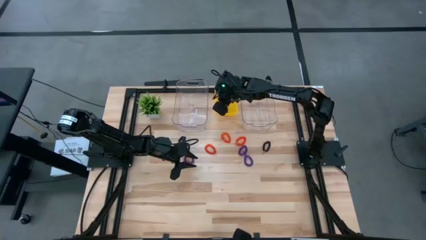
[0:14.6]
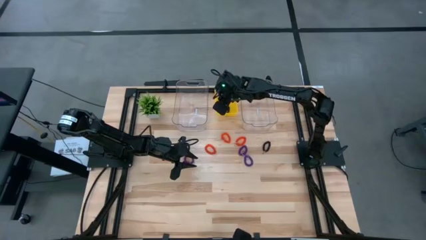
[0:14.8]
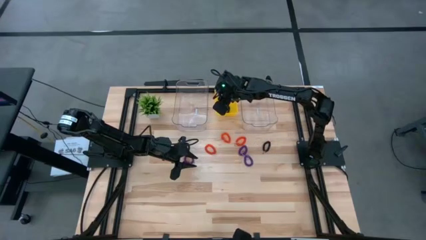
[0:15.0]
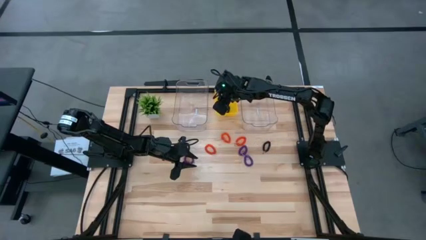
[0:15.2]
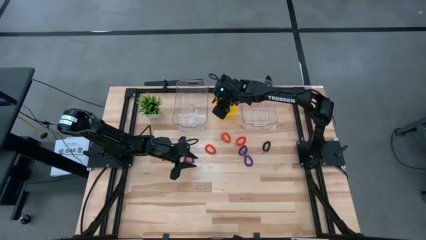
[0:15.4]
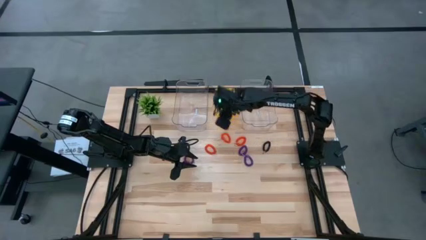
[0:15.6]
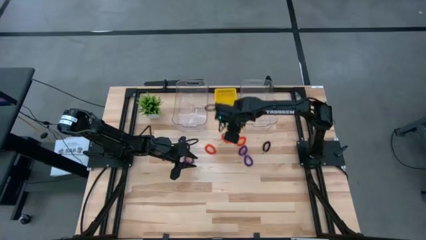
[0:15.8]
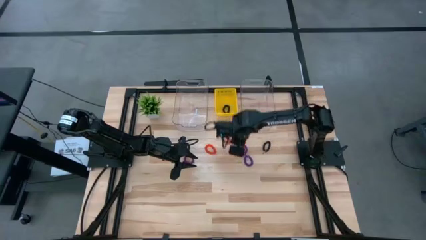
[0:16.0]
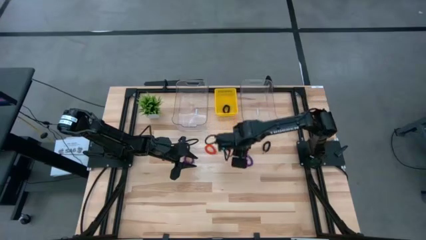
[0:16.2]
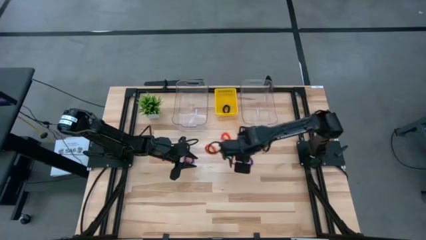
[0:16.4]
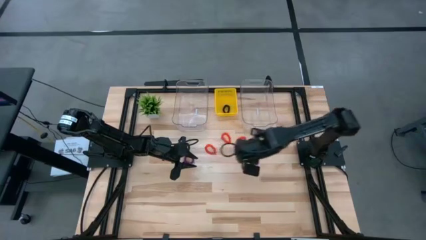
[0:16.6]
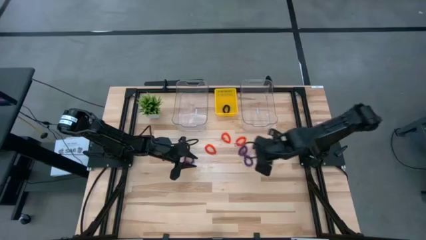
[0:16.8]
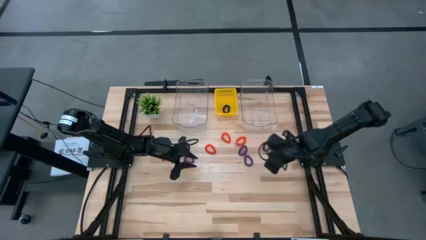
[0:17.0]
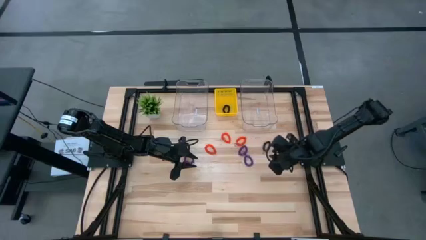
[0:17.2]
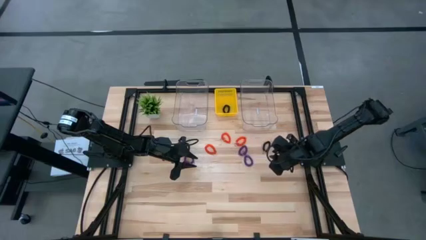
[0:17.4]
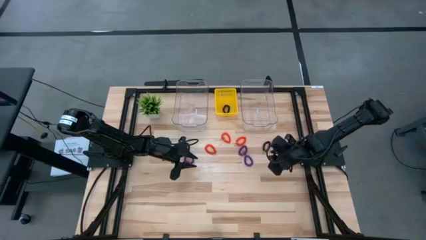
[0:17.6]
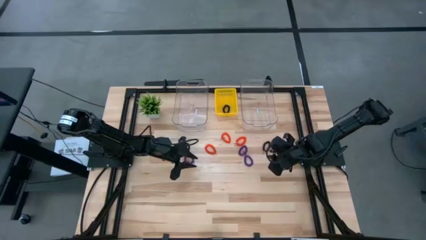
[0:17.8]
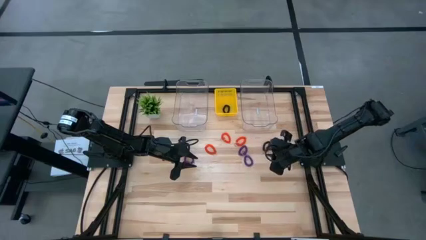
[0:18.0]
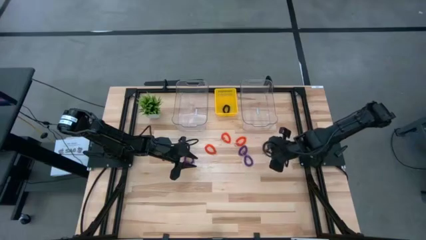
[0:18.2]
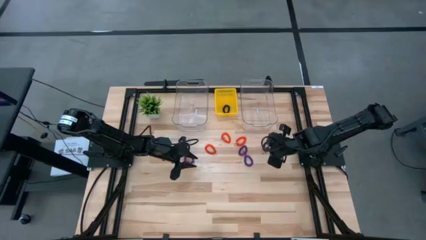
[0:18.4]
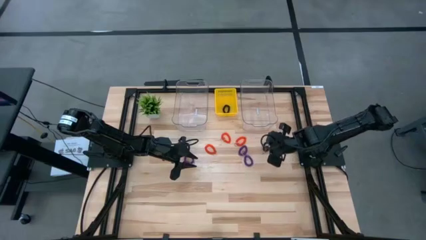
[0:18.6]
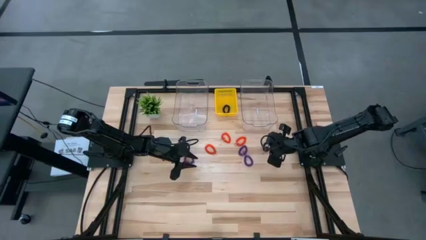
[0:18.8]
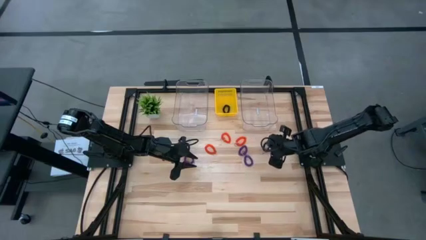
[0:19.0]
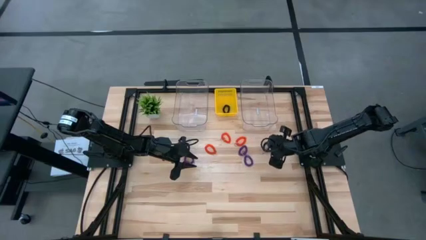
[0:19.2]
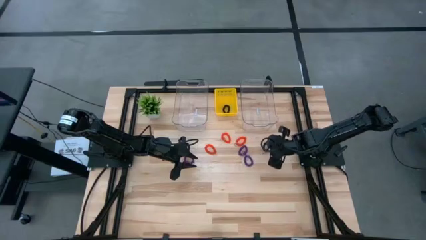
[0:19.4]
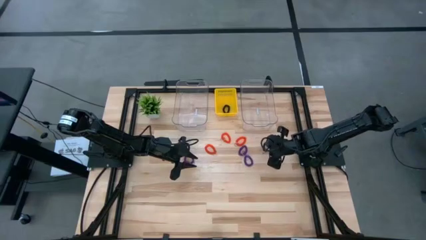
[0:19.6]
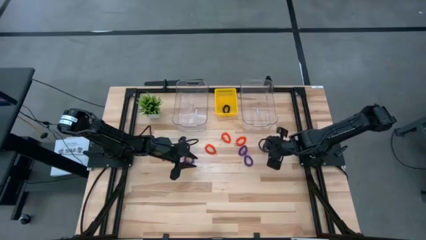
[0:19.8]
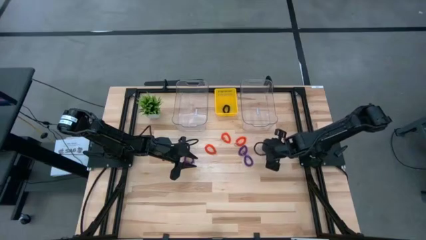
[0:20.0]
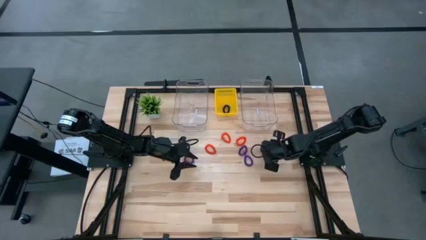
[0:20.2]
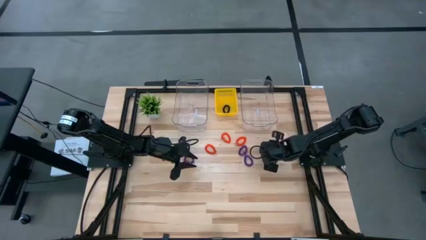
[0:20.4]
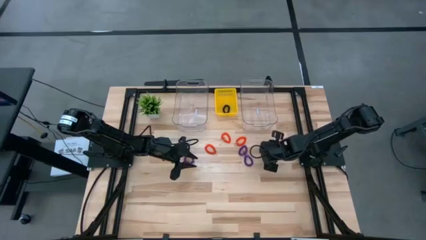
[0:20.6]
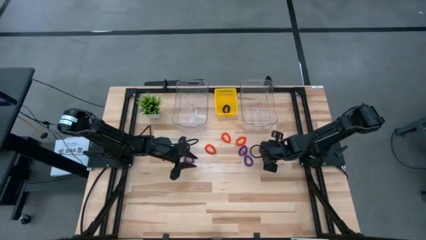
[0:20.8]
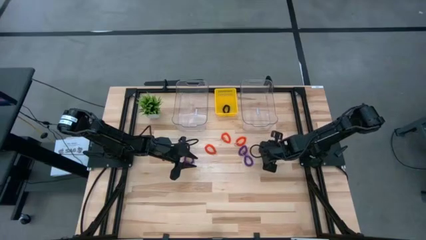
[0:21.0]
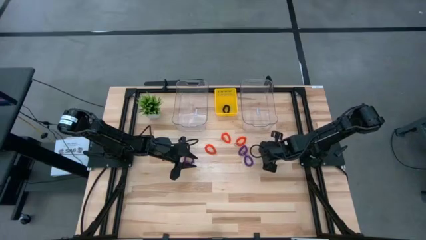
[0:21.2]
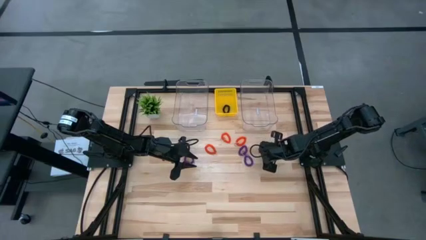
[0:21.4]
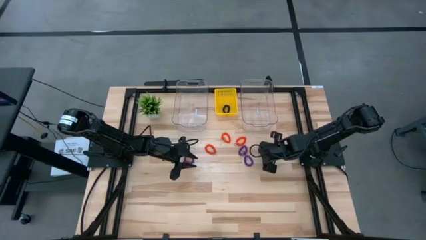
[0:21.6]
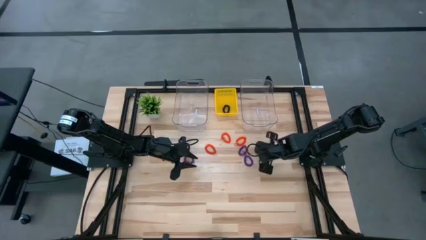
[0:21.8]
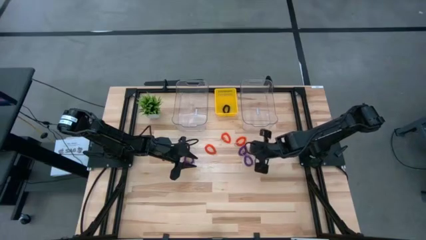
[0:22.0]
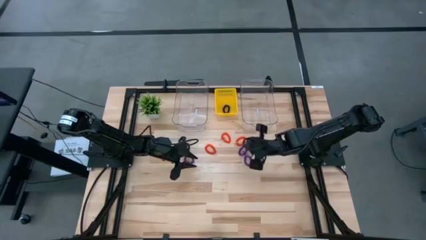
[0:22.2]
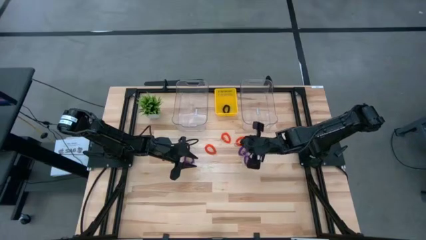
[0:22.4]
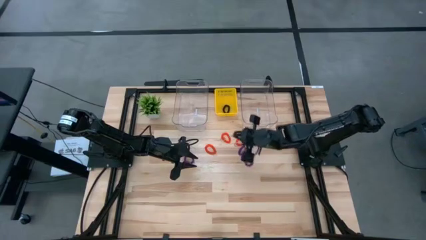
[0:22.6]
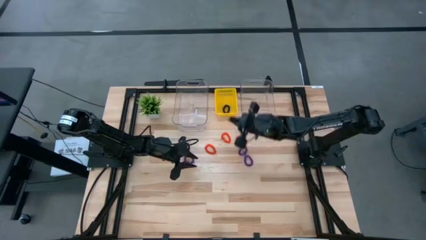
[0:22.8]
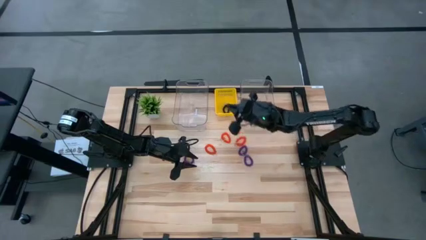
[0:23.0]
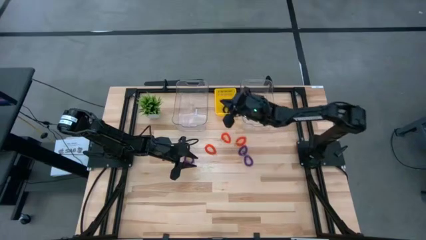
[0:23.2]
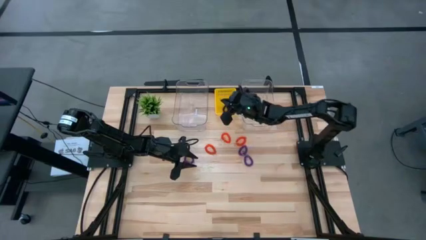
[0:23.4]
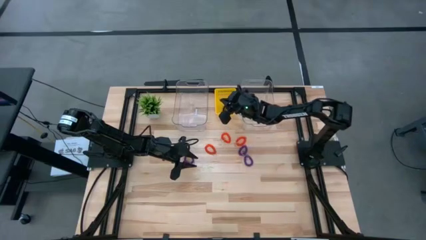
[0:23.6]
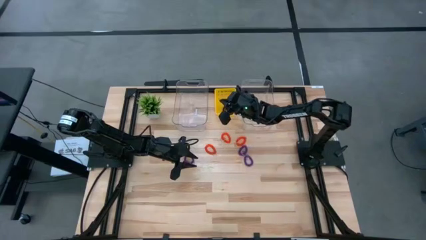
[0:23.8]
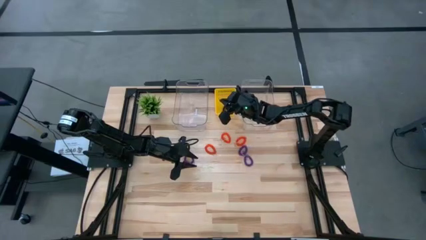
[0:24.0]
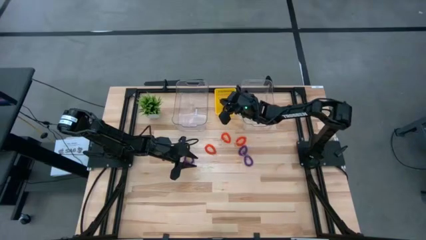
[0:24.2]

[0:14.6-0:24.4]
Task: Sort spring keychains
Put the right black spring keychain into the yellow bin

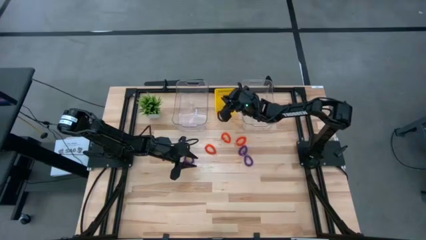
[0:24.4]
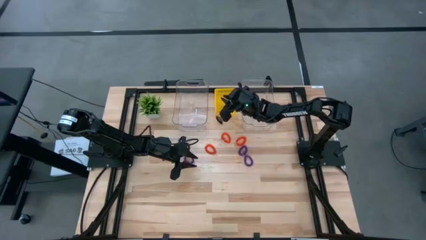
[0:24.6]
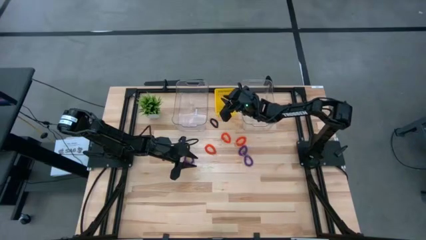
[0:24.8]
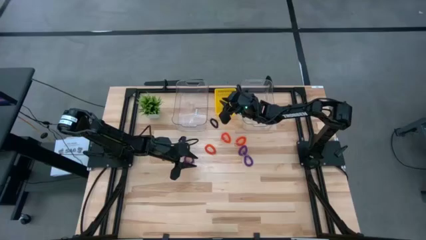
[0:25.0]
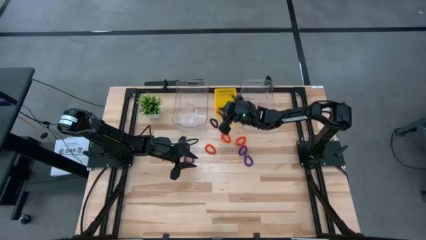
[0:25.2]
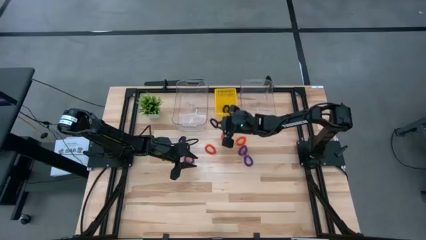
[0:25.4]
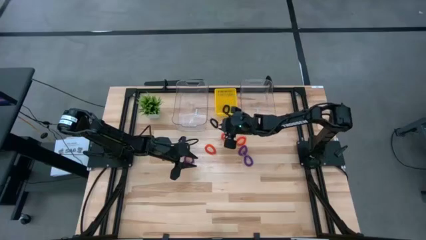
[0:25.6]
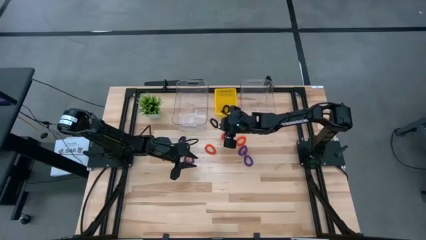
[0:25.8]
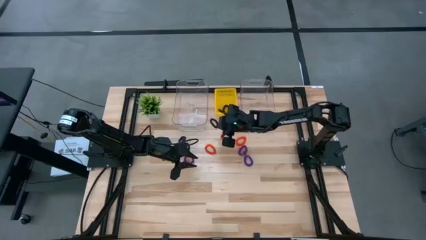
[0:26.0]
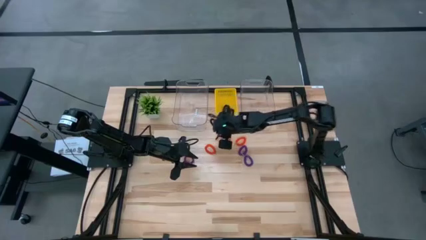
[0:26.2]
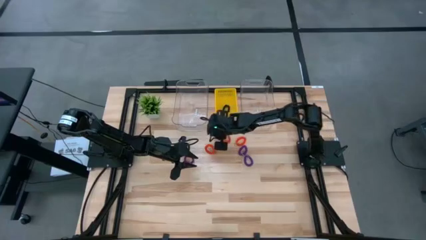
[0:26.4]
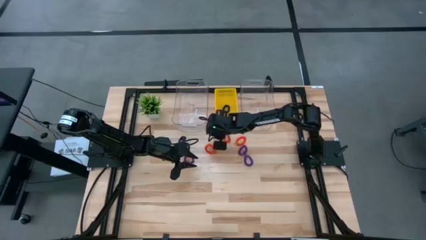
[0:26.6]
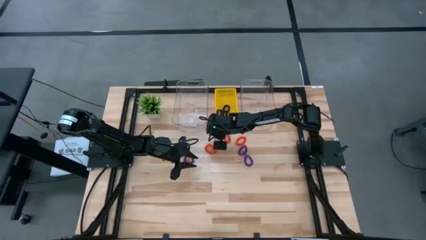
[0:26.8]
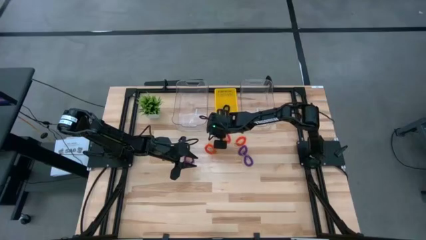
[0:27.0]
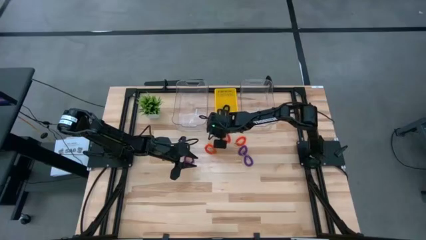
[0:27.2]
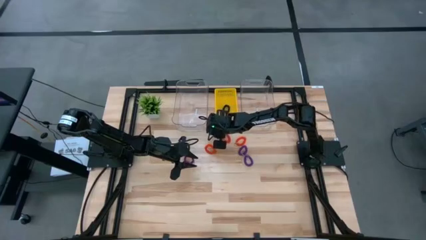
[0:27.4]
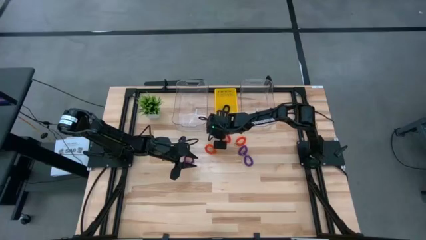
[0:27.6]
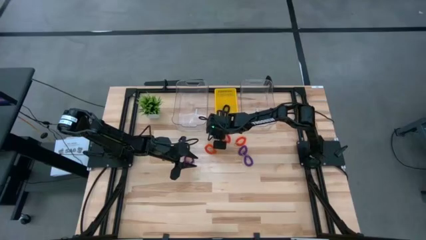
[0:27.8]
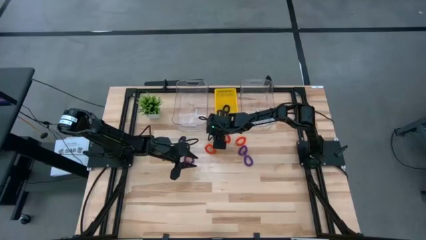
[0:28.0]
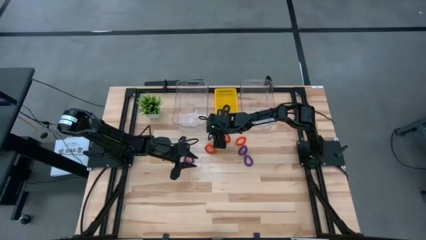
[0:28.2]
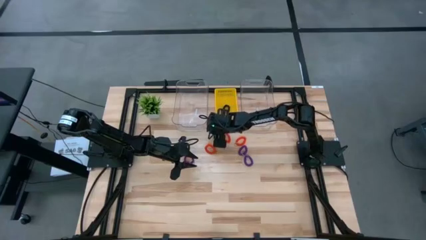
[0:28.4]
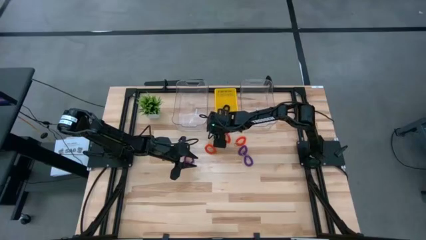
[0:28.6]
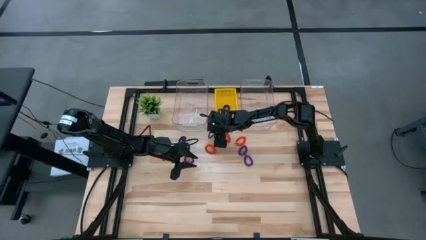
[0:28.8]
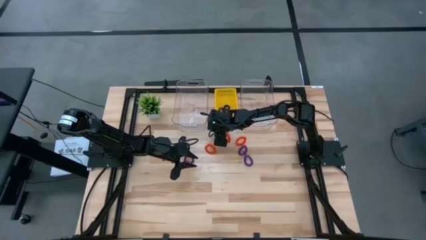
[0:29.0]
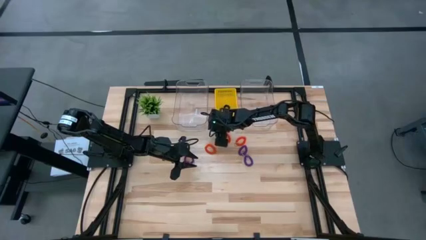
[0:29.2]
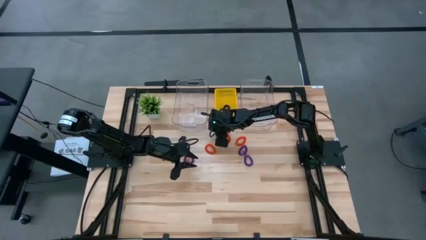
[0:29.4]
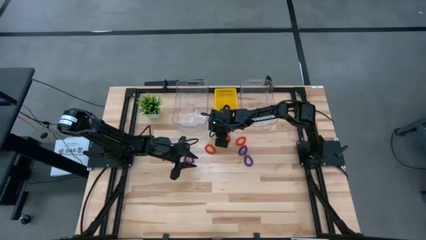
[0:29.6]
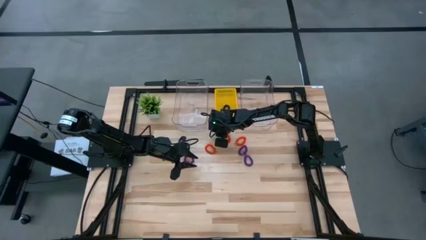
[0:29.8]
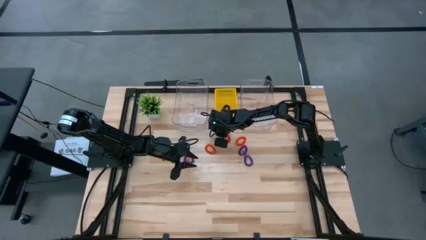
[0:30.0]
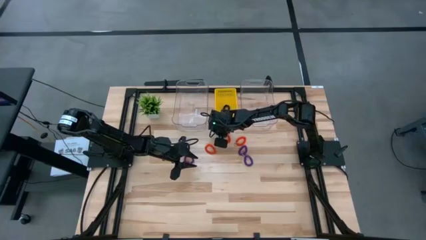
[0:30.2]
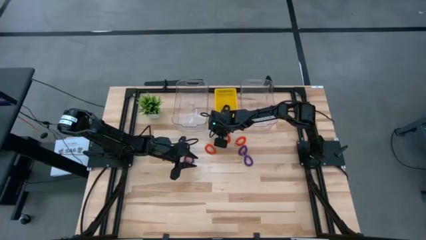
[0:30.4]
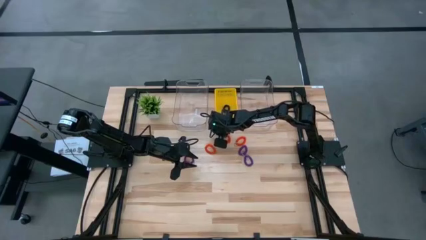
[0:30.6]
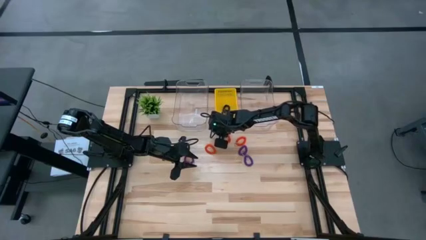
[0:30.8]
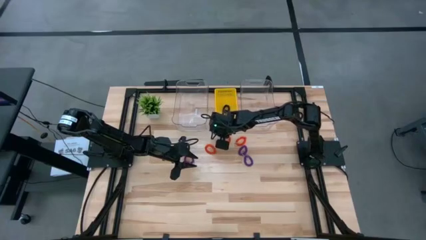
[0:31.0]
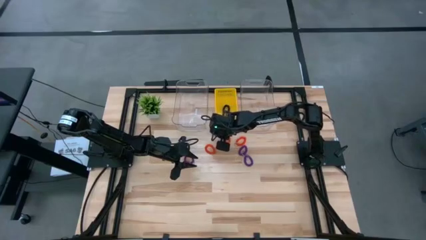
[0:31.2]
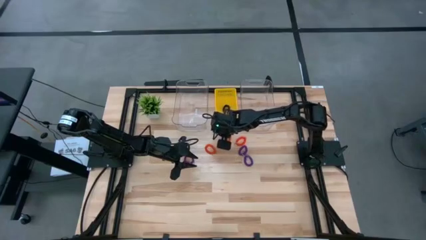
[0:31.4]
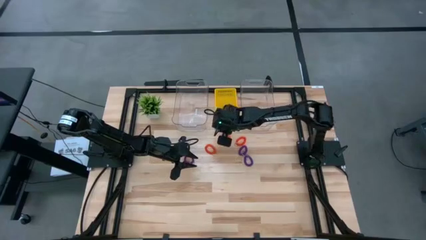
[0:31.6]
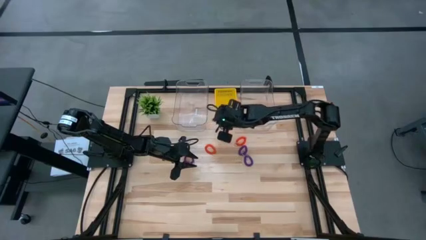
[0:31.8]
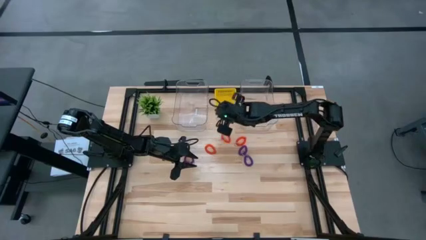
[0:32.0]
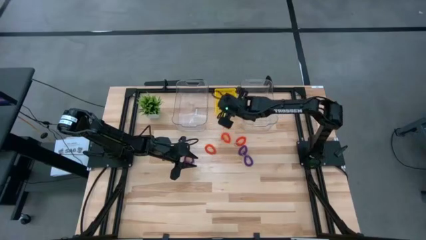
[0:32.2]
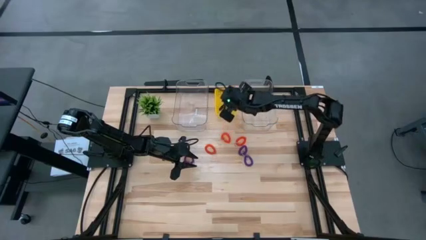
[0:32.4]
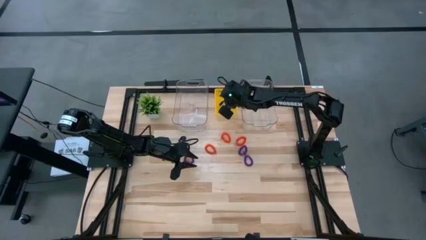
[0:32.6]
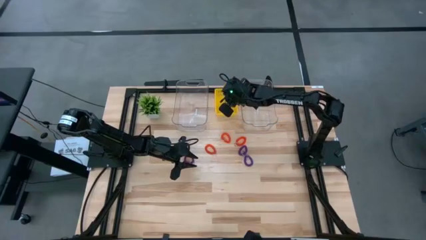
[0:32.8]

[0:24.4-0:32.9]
Put the right black spring keychain into the yellow bin
